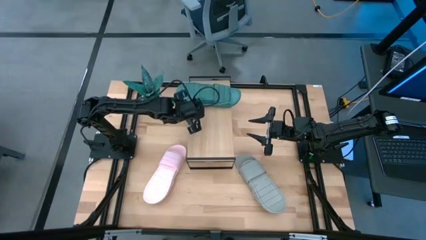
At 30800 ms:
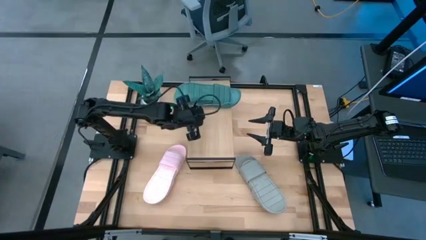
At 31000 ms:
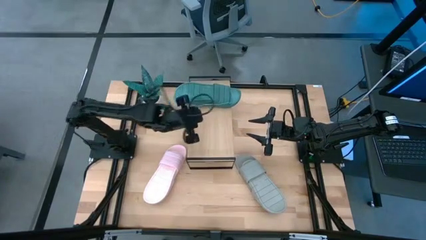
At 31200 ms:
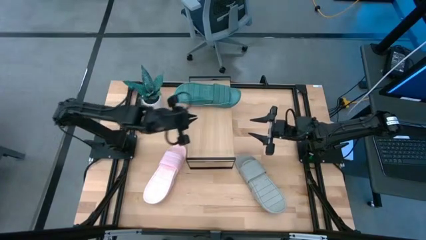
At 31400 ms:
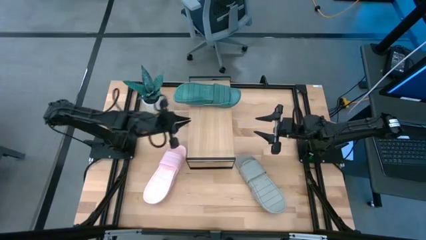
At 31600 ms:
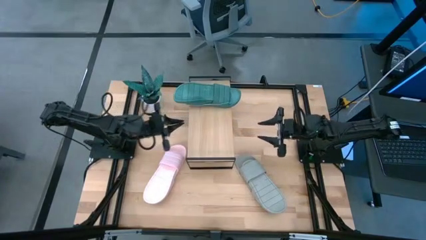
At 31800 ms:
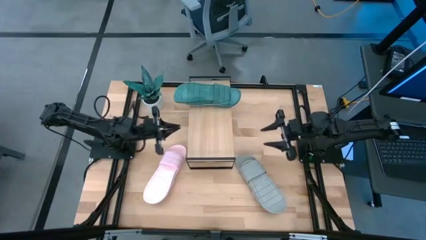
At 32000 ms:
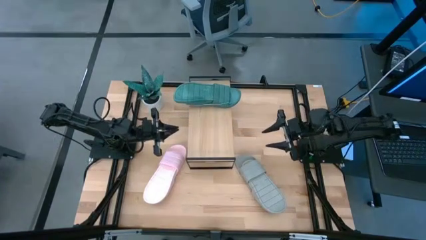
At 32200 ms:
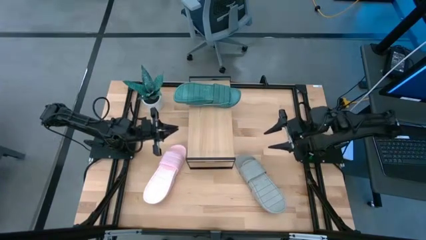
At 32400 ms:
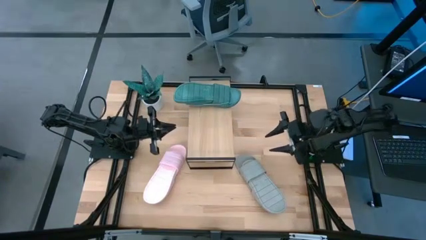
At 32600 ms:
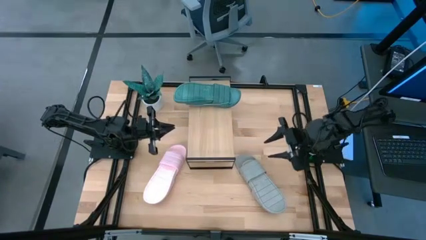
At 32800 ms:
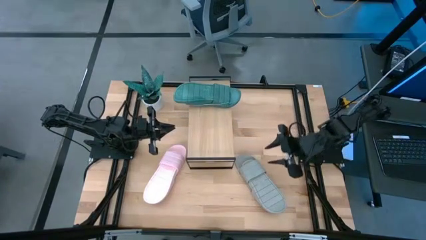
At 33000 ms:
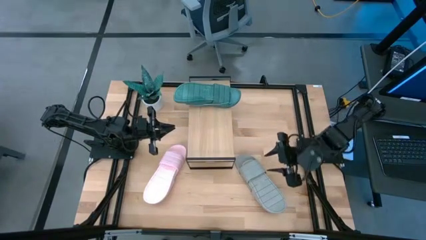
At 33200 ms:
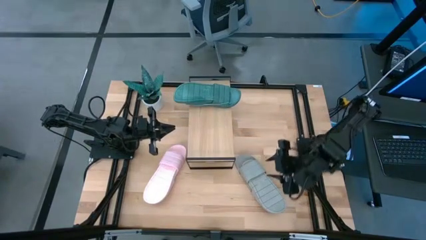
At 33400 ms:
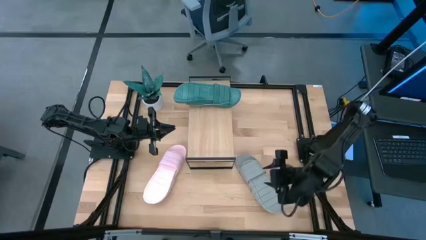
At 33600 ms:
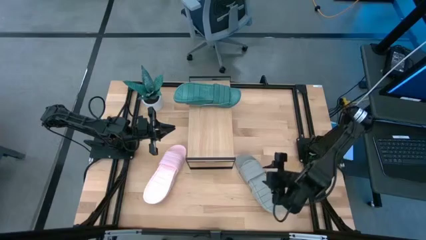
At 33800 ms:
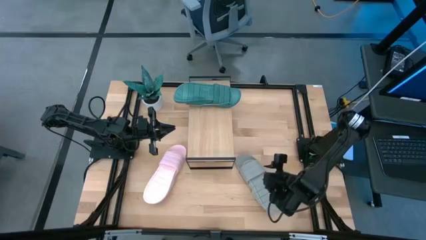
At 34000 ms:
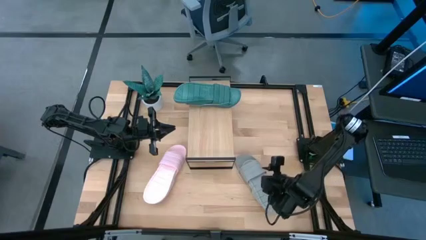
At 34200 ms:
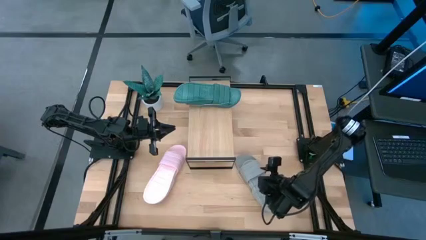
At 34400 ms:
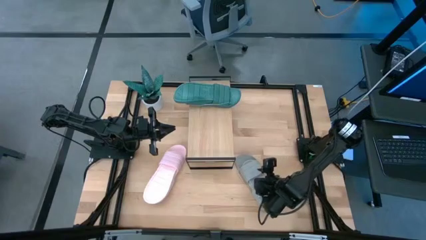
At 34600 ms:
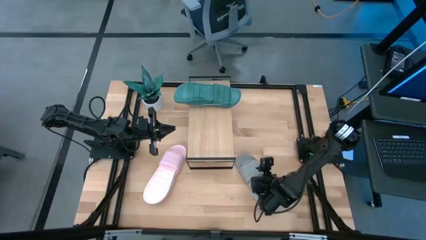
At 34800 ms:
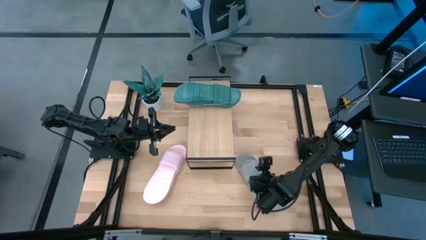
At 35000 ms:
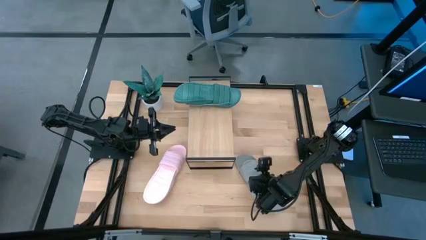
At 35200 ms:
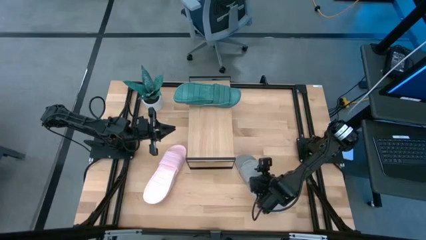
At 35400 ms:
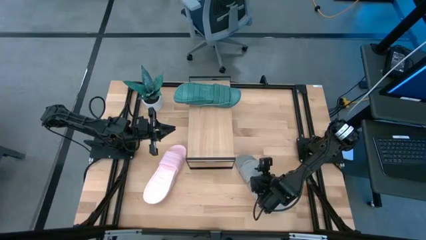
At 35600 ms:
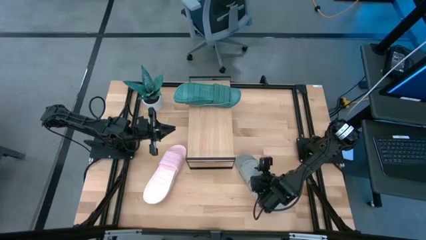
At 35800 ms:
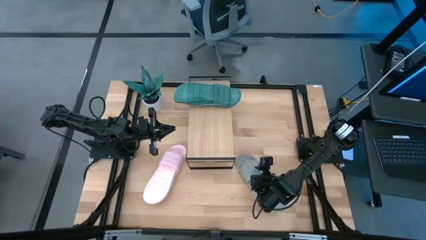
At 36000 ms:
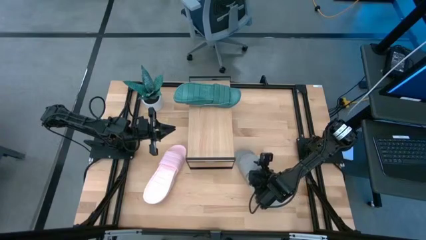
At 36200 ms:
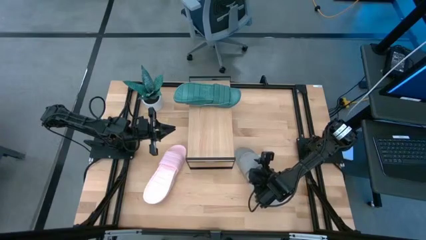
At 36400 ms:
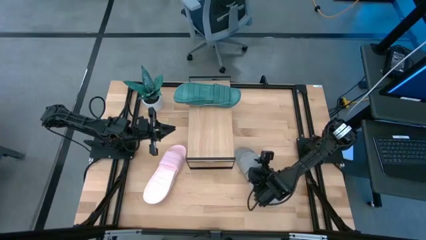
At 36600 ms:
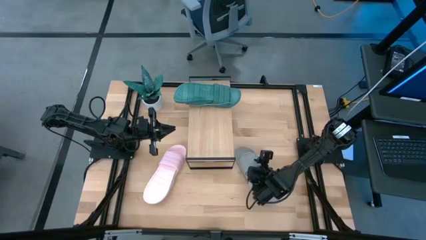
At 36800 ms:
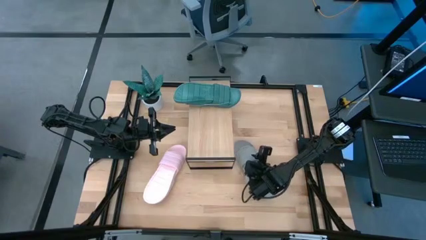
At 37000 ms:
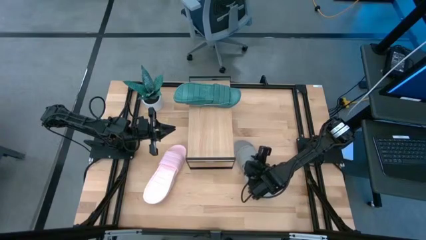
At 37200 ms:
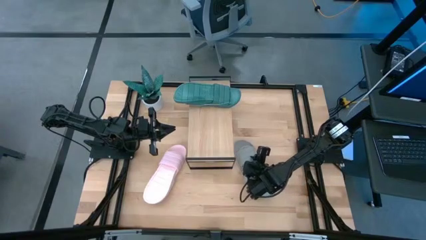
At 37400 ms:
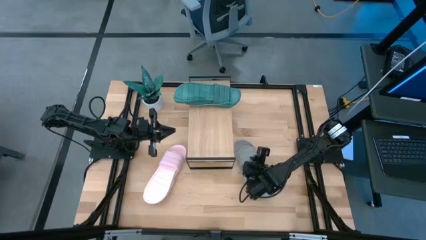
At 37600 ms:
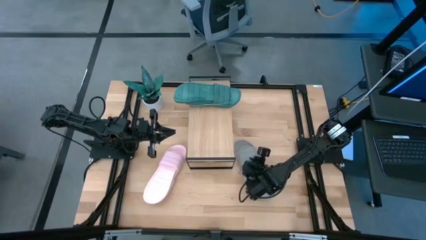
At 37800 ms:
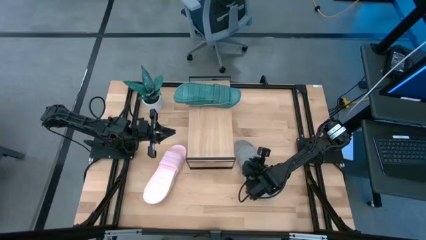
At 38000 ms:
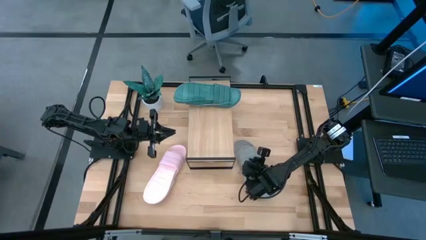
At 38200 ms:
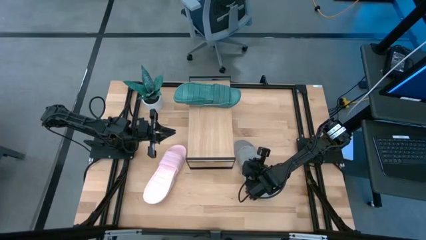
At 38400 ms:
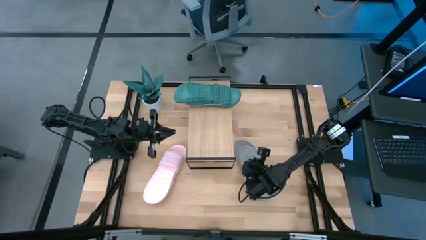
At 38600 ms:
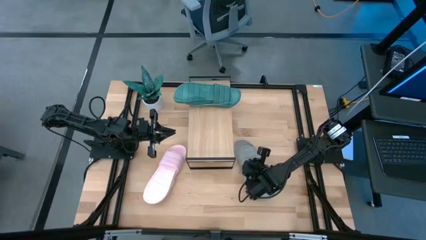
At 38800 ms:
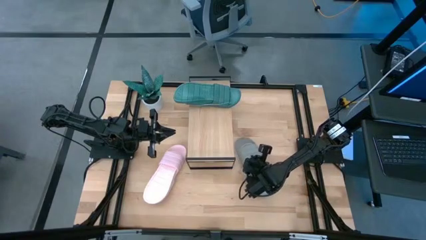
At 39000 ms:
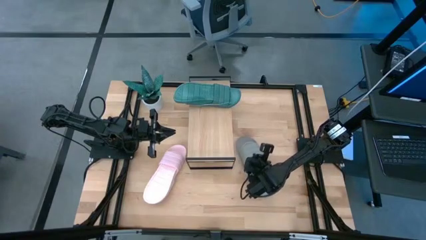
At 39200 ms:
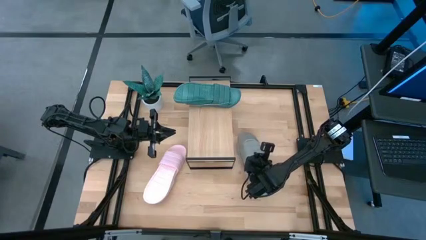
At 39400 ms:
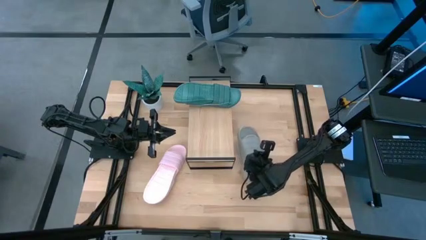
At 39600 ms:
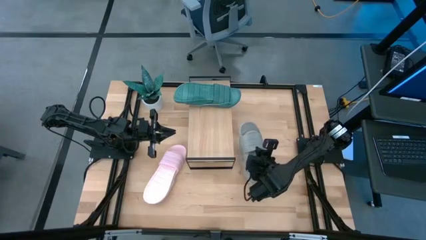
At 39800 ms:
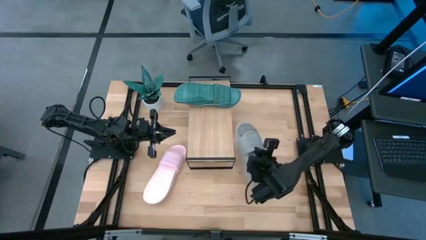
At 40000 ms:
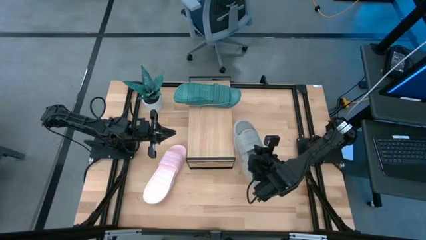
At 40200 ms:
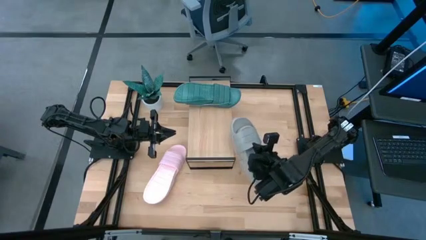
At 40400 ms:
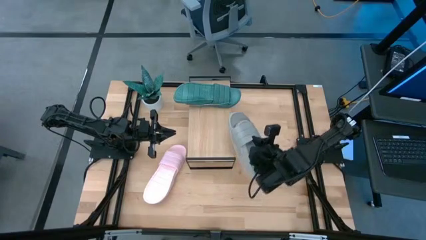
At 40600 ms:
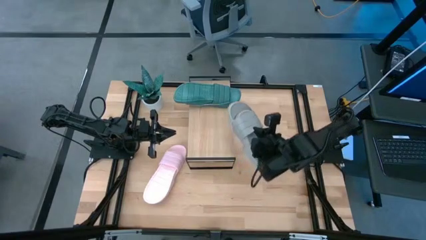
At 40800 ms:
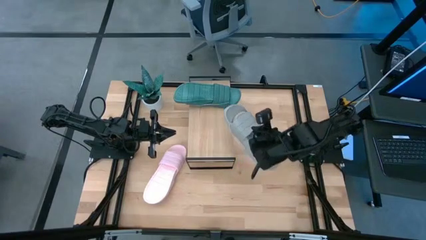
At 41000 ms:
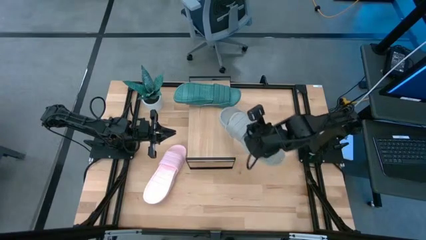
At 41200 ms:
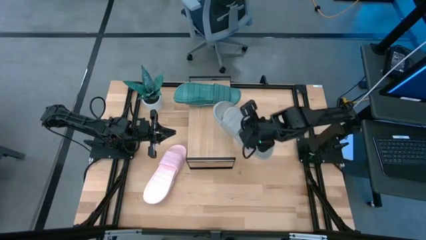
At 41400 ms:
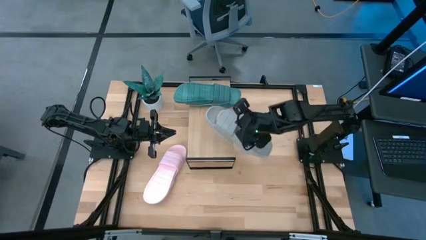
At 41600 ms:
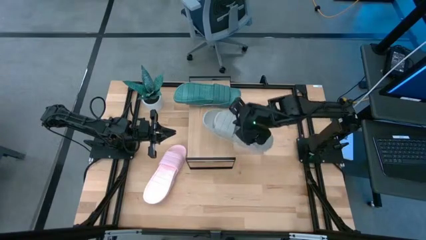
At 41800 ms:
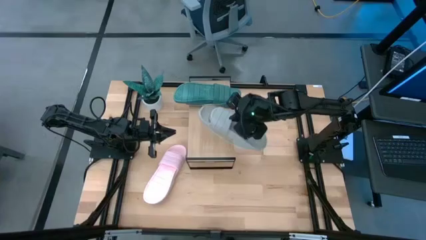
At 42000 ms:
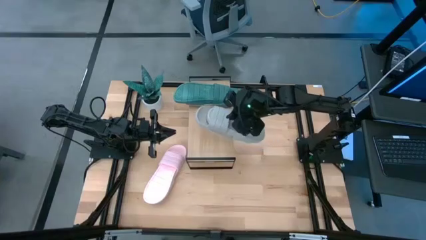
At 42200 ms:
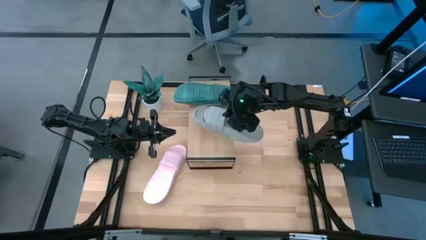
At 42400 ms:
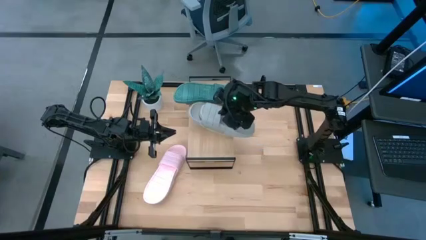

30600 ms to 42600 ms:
Task: Pick and place slippers onto the shelf
Put the gray pair of slippers on the shelf
